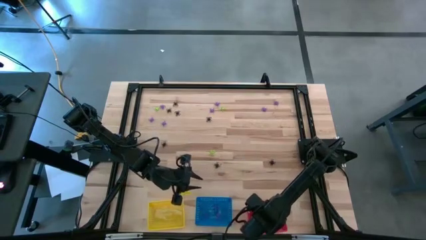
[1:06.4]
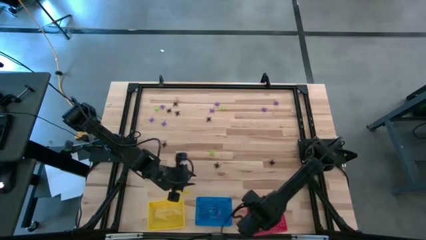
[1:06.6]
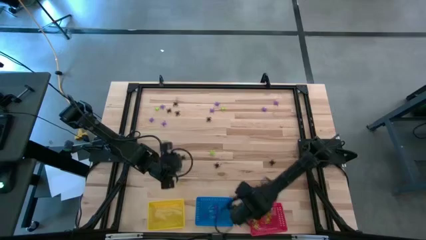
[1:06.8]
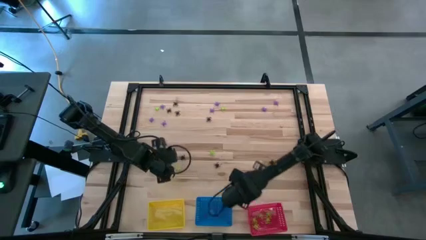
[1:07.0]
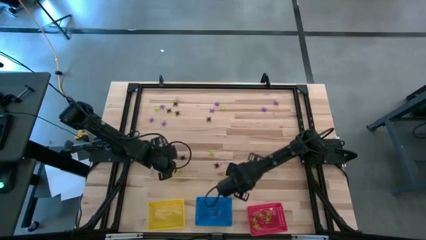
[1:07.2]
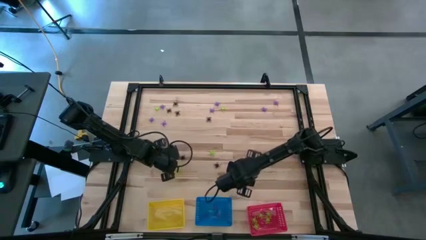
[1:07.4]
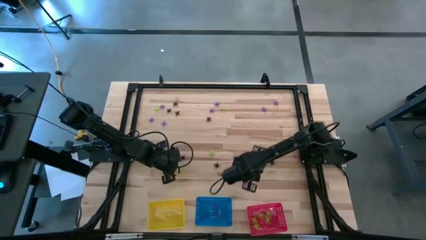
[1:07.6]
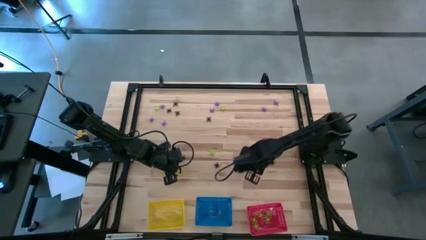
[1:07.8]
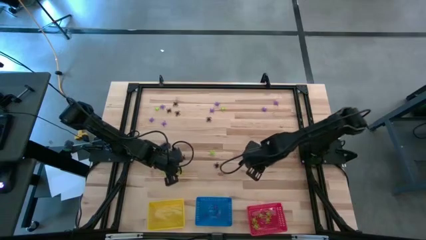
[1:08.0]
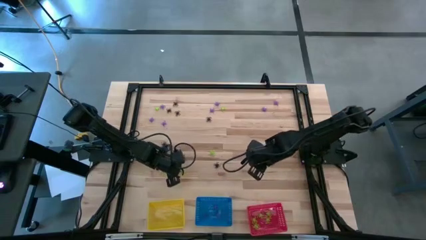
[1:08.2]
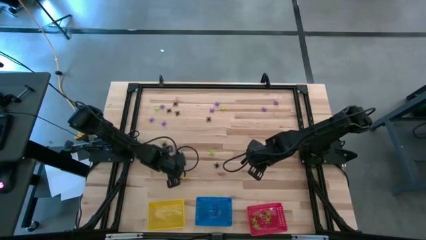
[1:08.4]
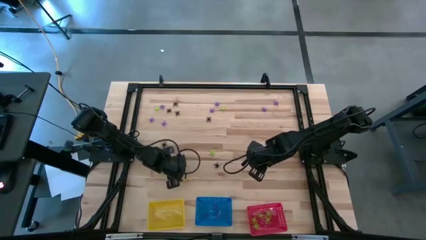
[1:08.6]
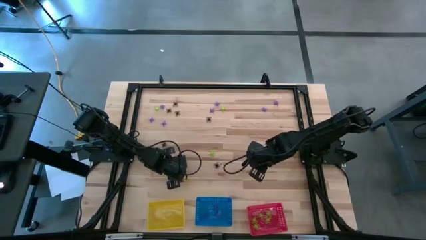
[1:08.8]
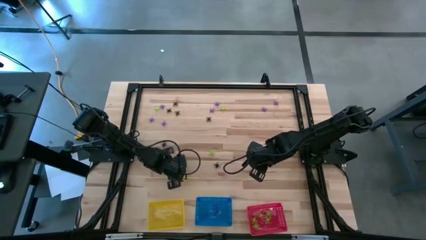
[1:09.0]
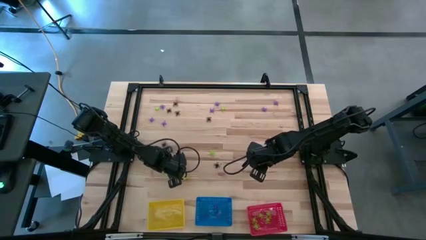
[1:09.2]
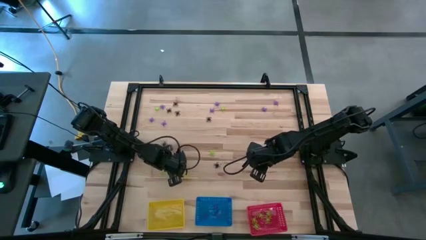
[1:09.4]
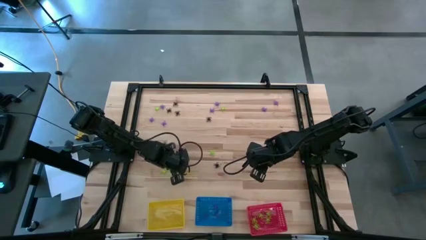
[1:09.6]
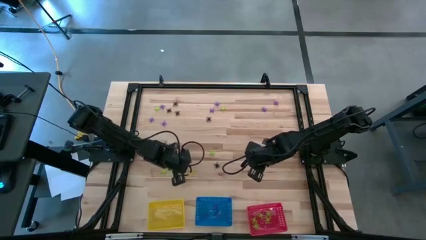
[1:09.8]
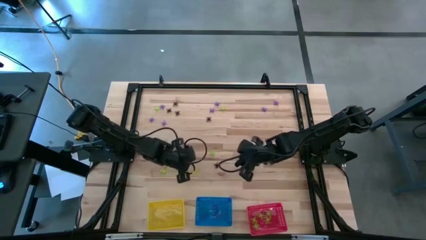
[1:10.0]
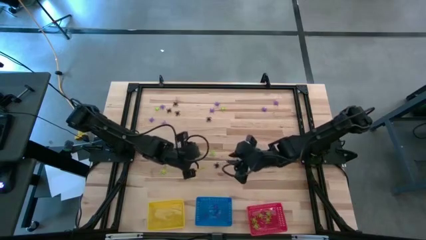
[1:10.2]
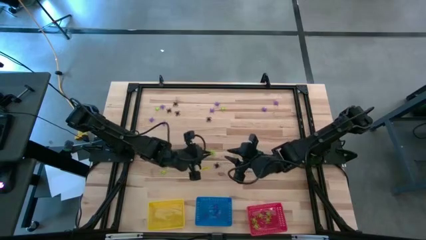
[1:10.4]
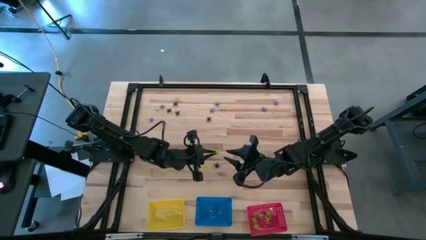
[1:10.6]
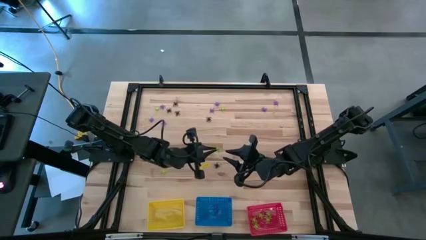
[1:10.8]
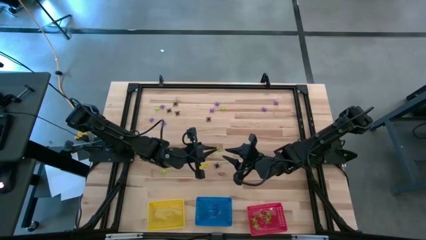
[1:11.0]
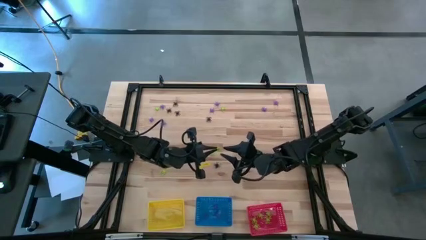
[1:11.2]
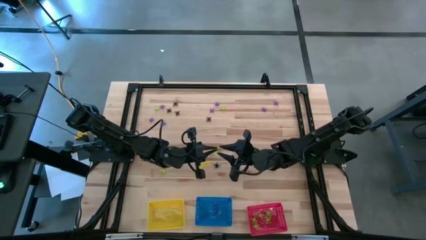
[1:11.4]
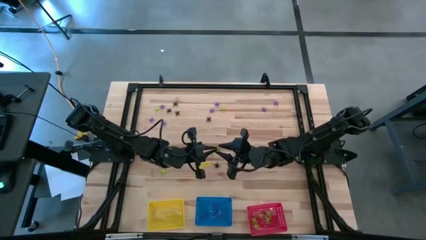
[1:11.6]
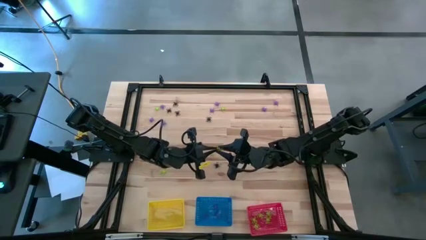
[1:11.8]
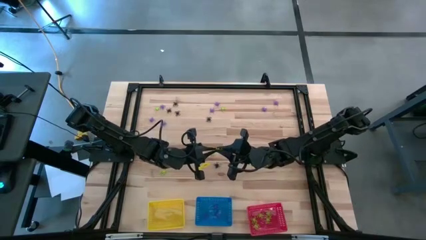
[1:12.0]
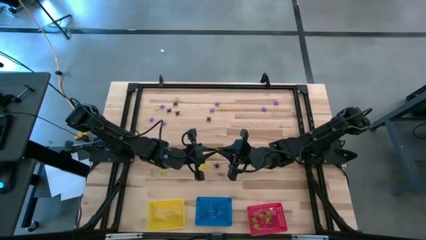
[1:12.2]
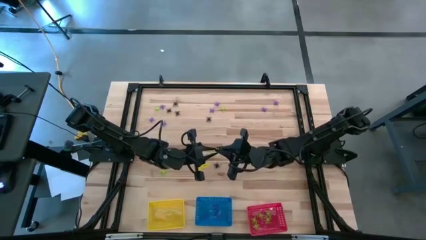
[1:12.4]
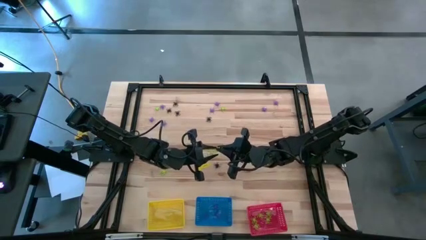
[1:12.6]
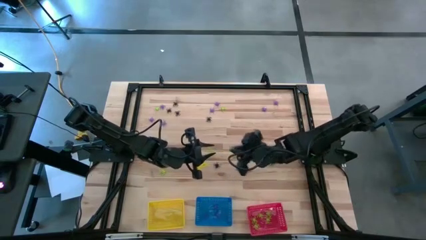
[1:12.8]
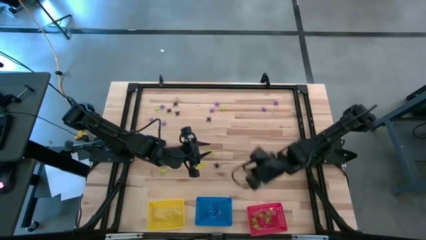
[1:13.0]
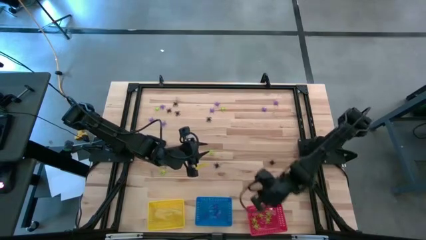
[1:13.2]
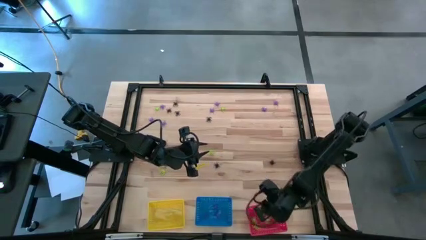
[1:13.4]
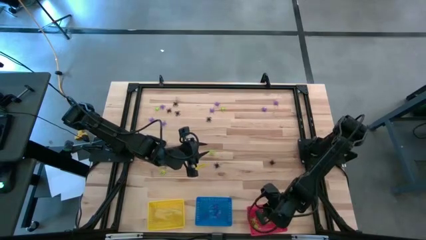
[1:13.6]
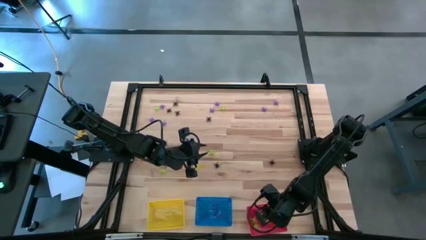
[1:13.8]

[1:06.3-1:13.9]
Task: Sort Halloween decoration
Put the green spider toy into the red bin

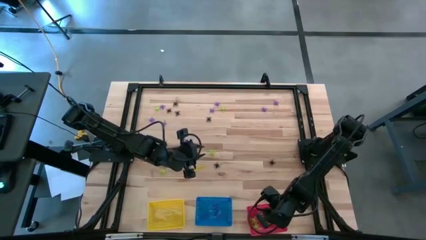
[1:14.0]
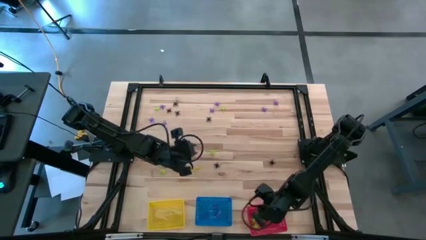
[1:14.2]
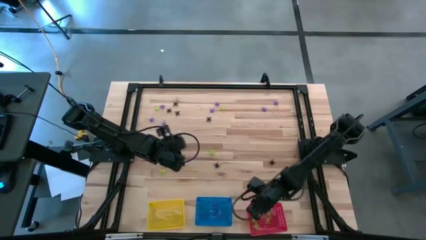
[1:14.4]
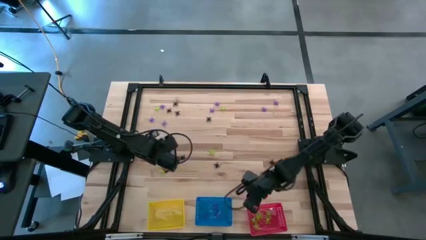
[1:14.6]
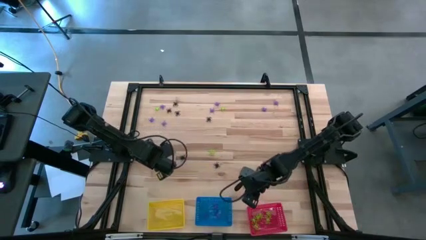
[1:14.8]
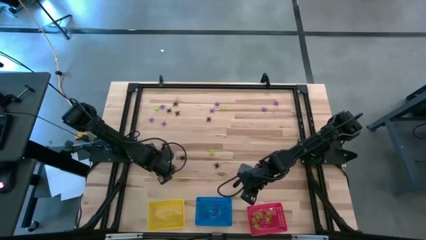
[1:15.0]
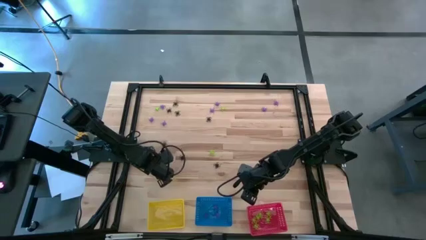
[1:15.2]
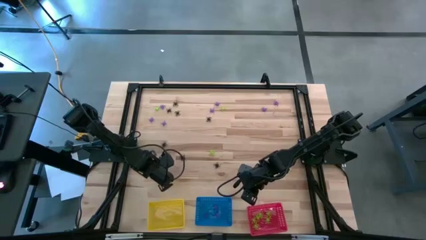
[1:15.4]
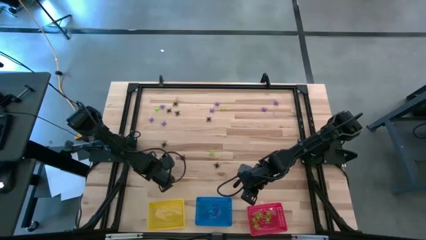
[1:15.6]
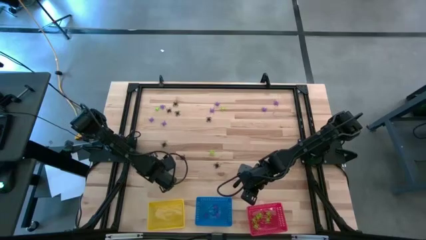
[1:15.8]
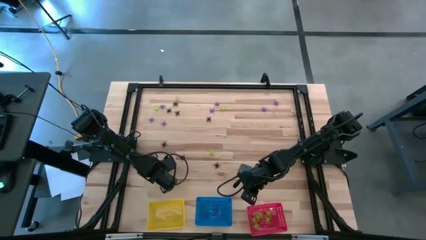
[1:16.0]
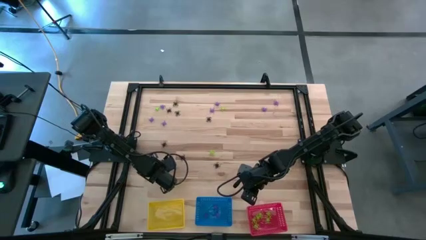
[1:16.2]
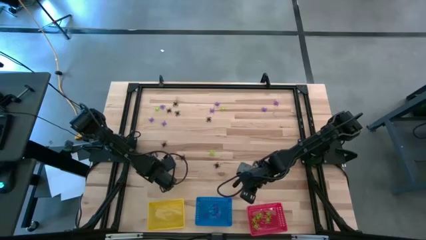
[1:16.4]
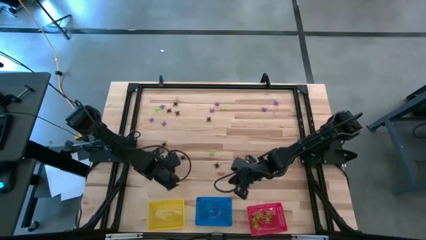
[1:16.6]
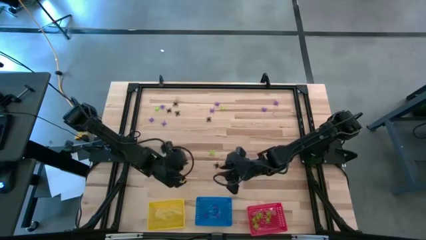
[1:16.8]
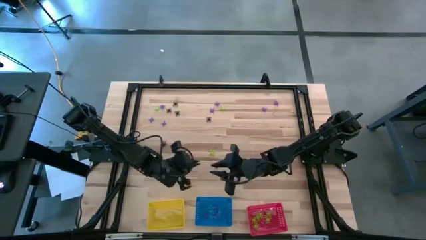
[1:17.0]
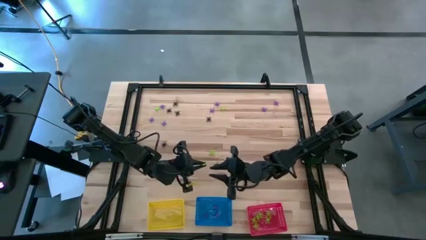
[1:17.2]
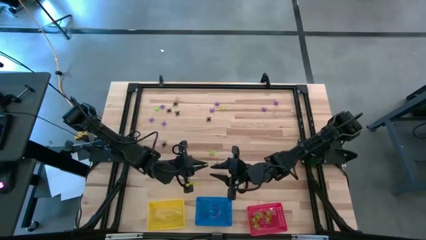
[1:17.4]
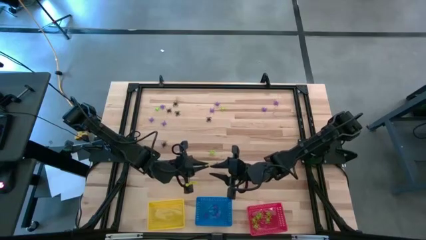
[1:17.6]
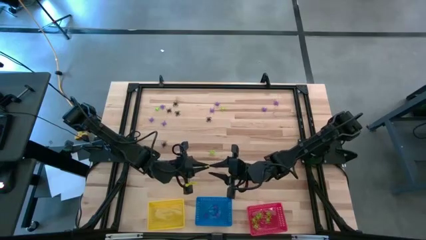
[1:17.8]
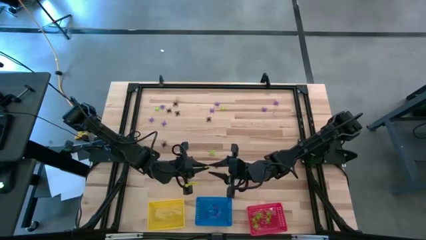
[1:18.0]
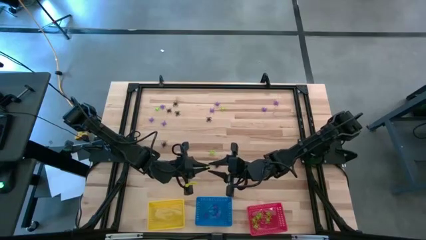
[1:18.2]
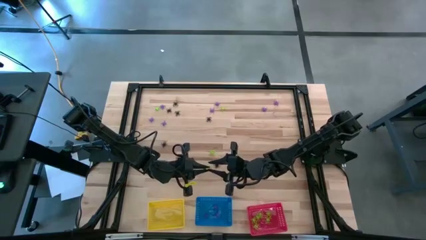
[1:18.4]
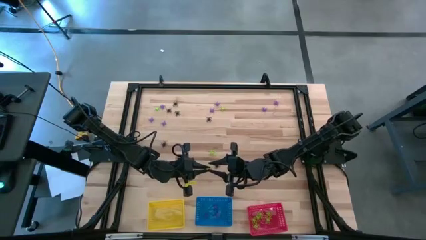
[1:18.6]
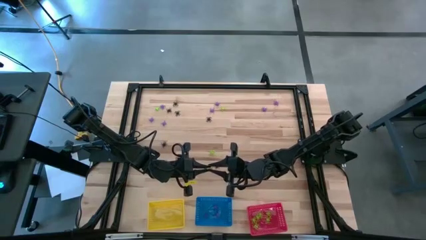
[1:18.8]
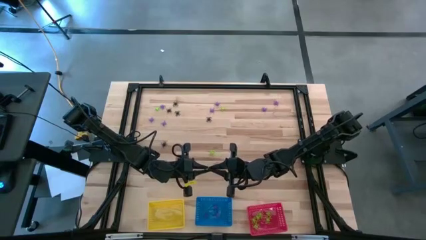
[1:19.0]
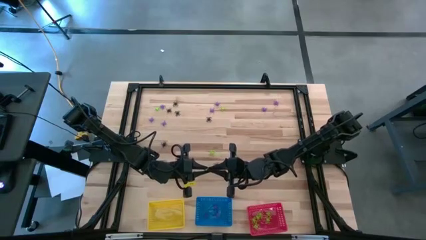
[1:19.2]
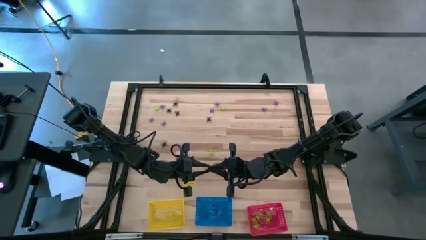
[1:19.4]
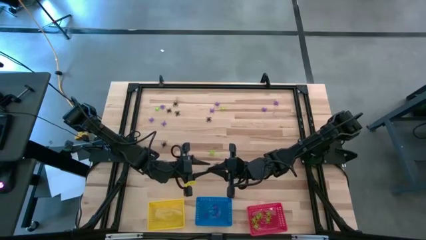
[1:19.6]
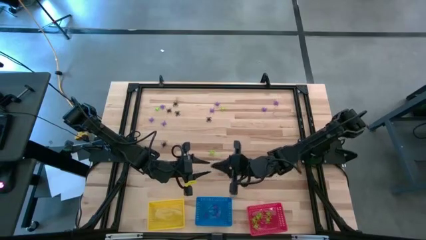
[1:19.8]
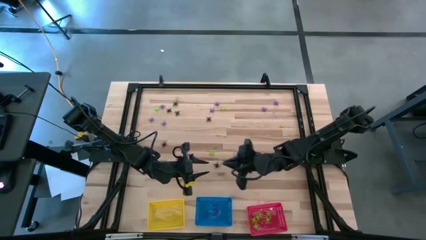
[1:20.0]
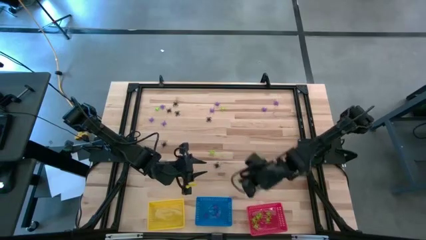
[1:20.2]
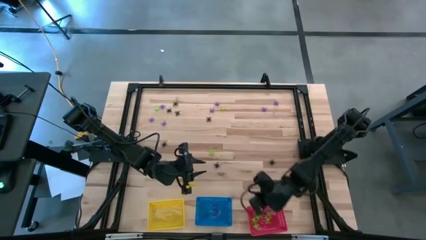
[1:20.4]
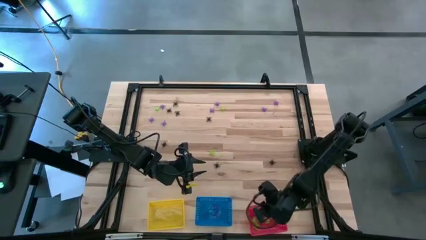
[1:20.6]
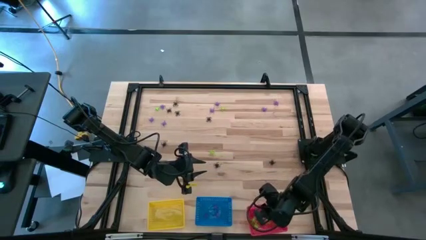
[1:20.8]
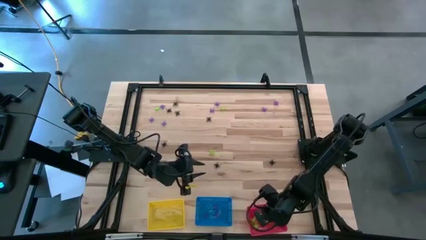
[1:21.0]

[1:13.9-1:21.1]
Put the green spider toy into the red bin

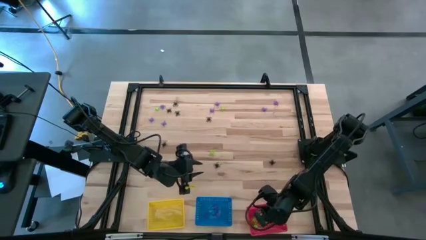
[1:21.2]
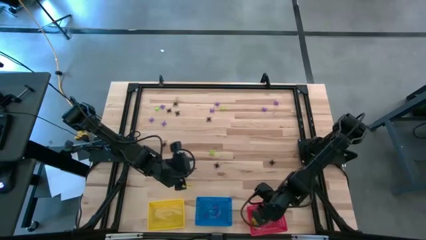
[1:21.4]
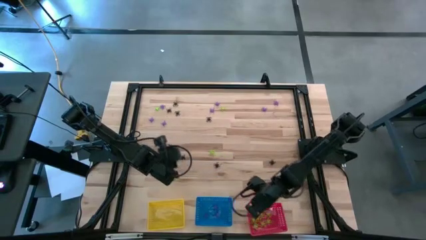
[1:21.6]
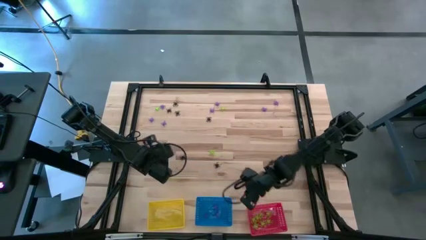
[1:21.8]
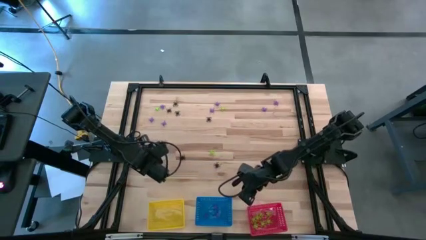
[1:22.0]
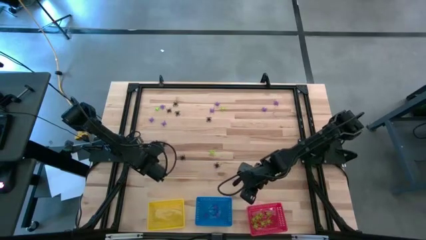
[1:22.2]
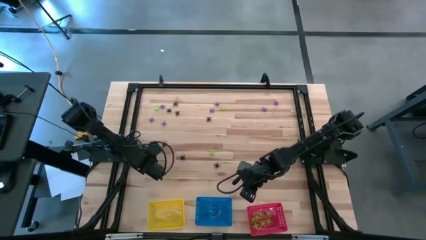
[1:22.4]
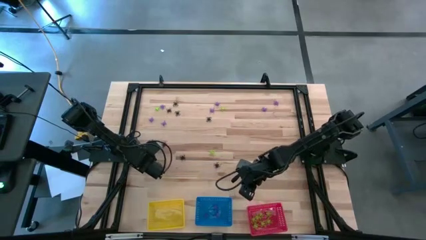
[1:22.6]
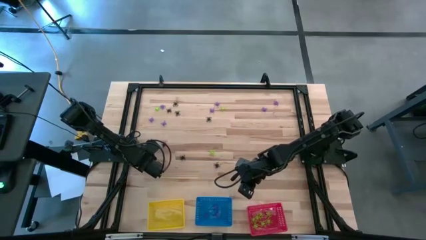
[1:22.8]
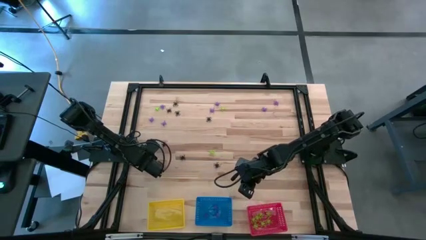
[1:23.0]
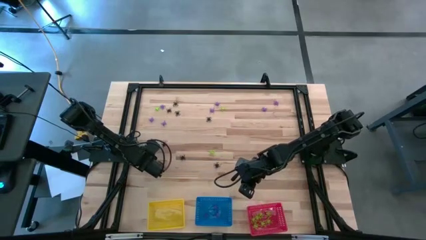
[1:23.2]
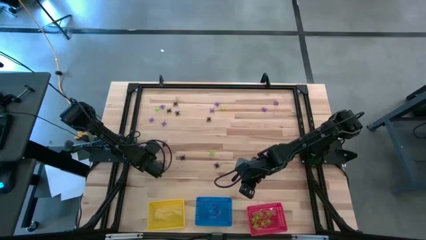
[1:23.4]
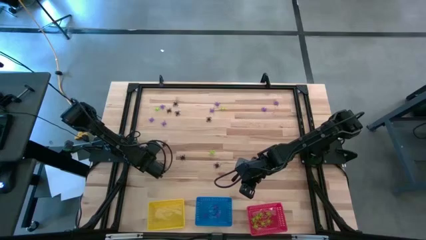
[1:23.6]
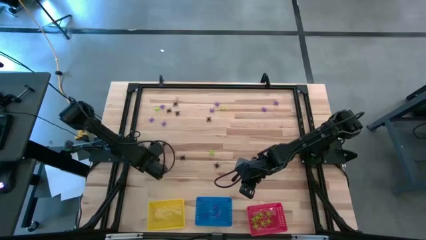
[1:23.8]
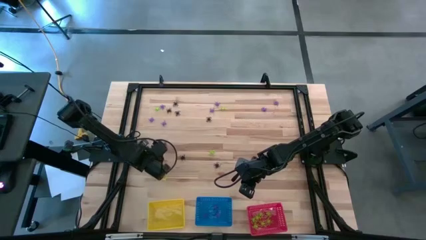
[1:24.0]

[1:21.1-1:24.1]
Put the green spider toy into the red bin
